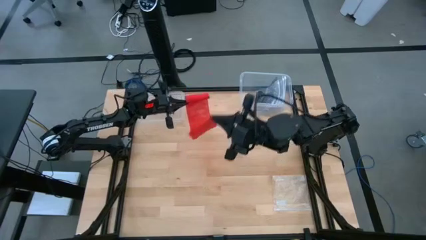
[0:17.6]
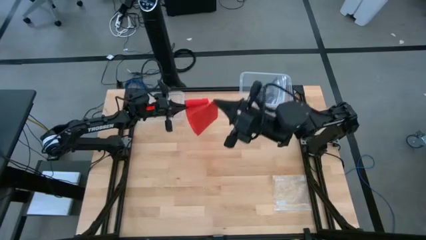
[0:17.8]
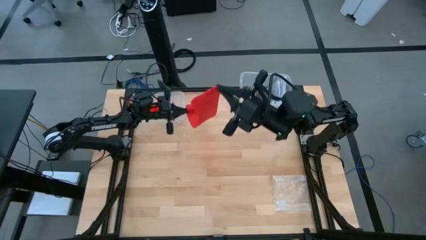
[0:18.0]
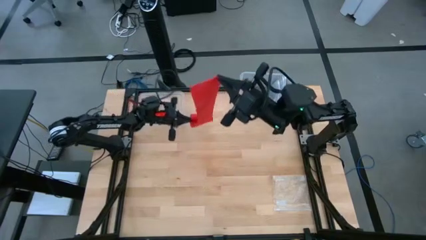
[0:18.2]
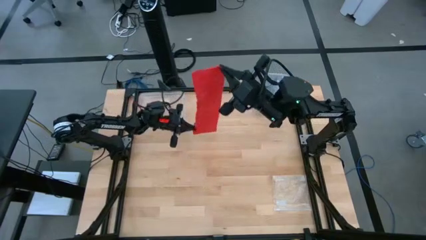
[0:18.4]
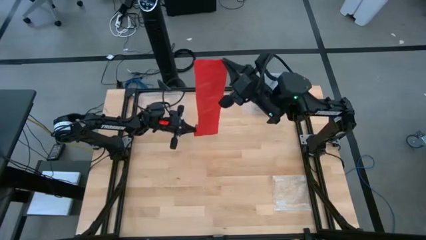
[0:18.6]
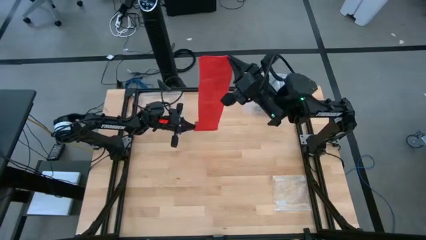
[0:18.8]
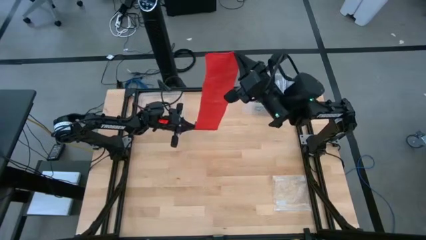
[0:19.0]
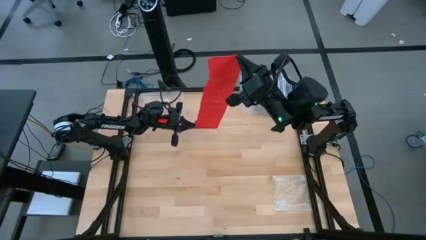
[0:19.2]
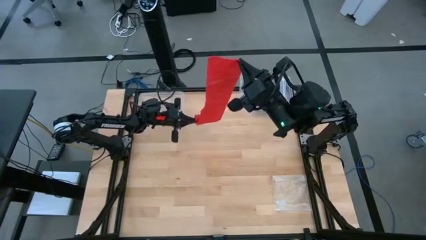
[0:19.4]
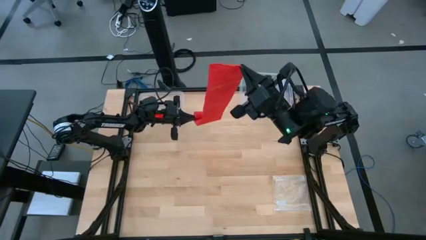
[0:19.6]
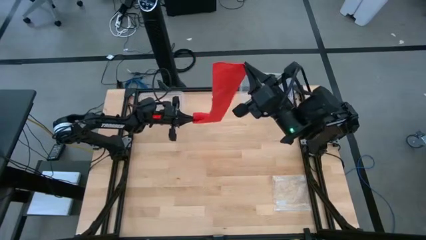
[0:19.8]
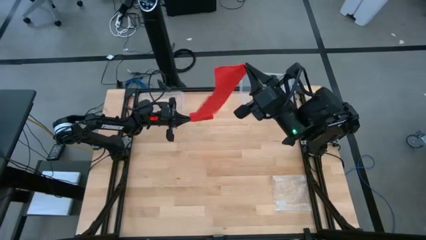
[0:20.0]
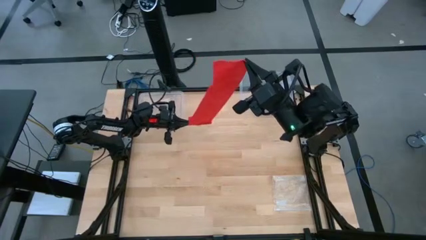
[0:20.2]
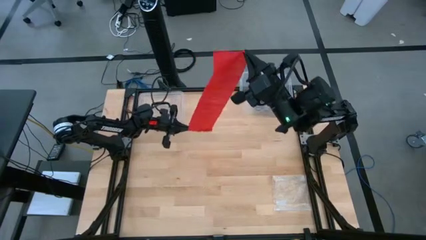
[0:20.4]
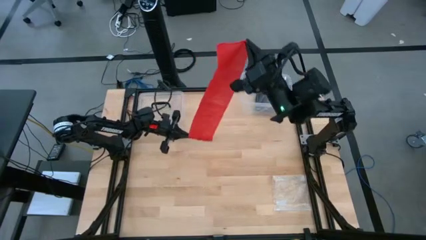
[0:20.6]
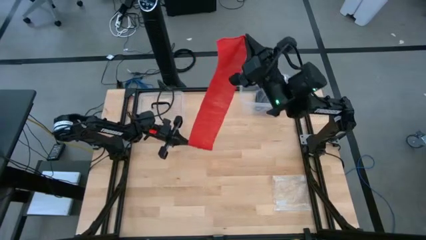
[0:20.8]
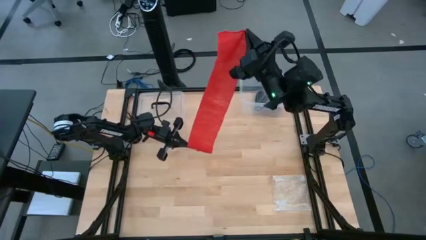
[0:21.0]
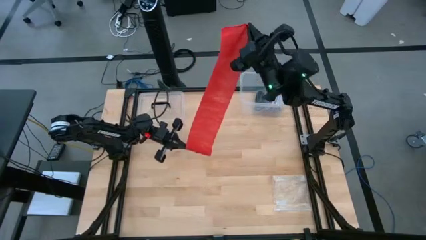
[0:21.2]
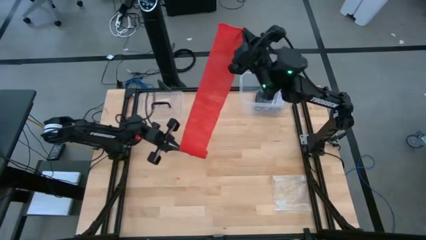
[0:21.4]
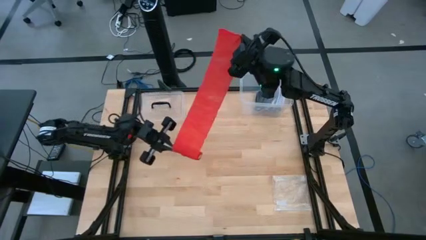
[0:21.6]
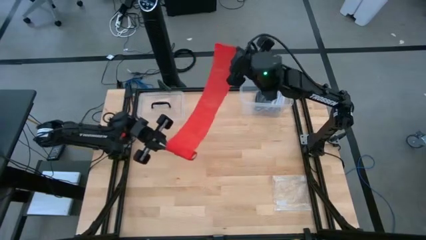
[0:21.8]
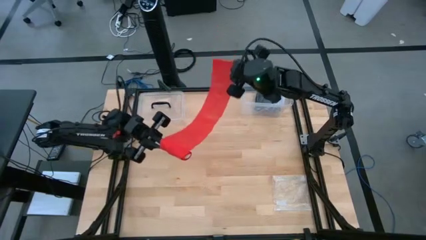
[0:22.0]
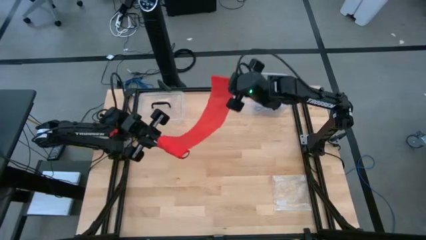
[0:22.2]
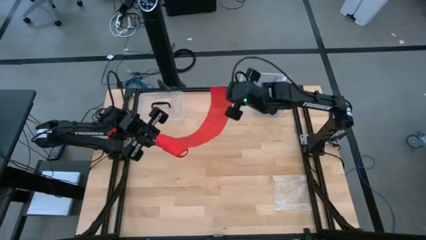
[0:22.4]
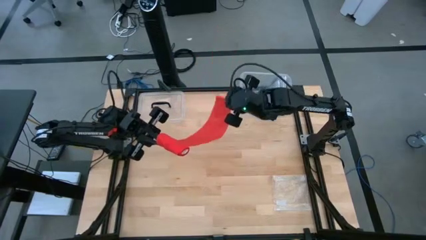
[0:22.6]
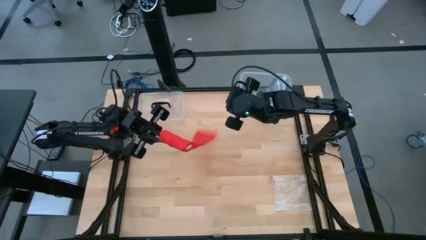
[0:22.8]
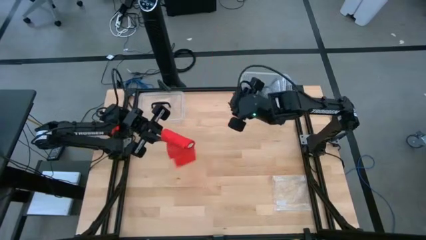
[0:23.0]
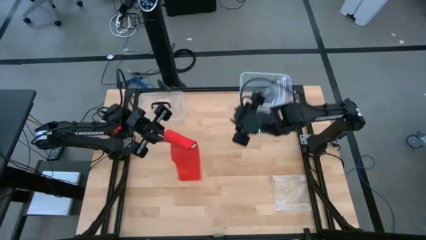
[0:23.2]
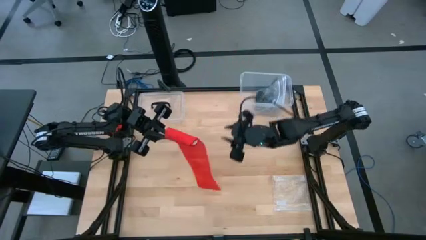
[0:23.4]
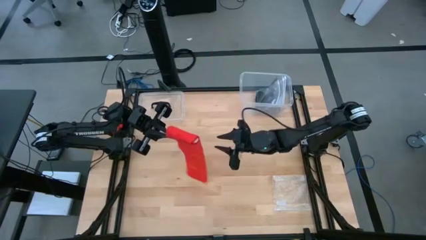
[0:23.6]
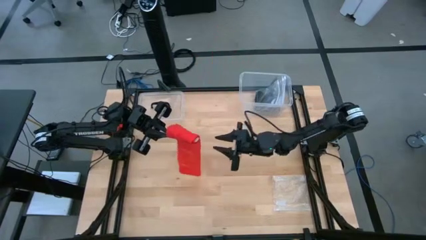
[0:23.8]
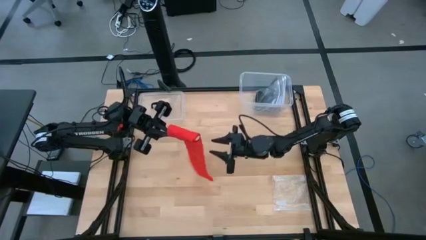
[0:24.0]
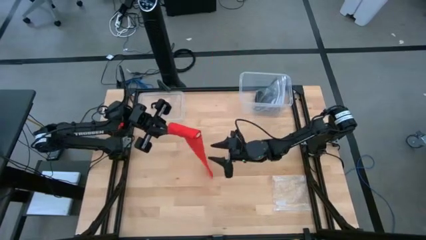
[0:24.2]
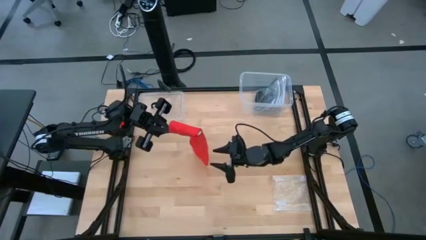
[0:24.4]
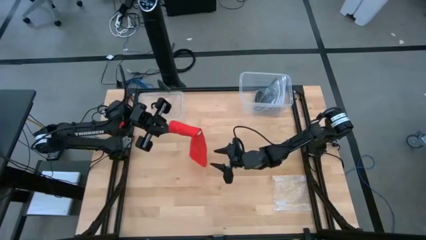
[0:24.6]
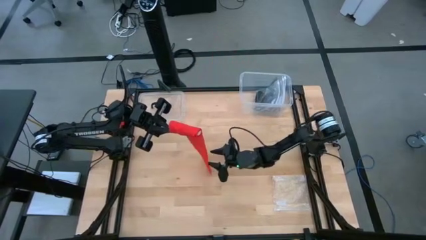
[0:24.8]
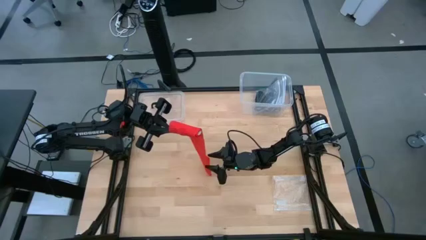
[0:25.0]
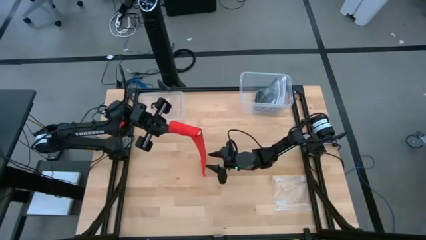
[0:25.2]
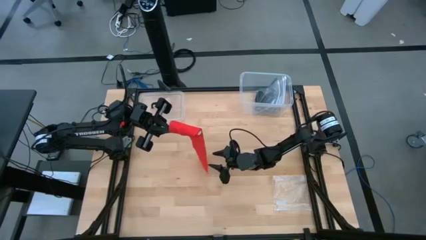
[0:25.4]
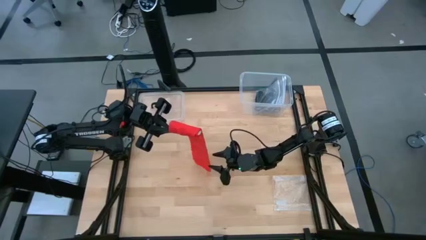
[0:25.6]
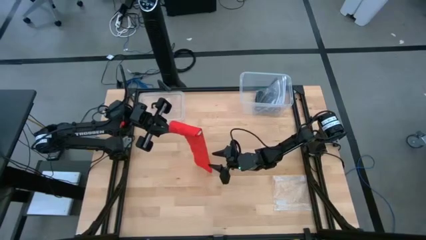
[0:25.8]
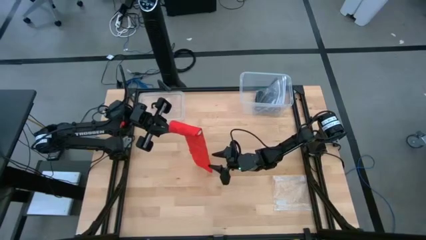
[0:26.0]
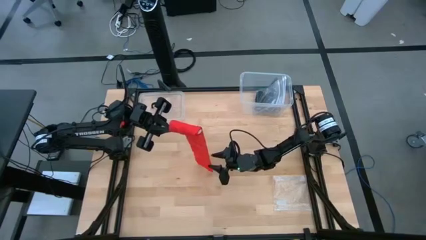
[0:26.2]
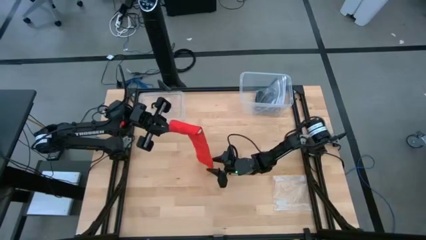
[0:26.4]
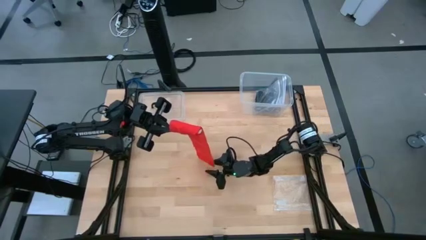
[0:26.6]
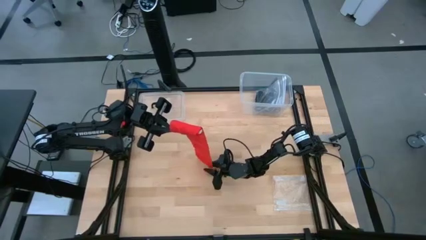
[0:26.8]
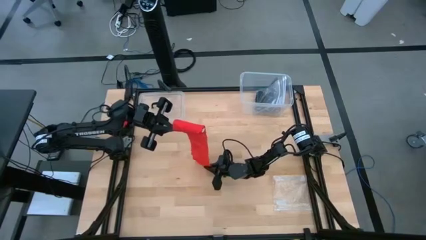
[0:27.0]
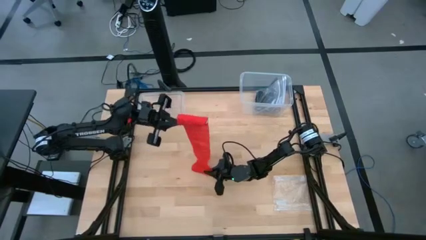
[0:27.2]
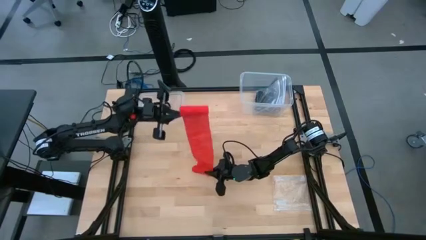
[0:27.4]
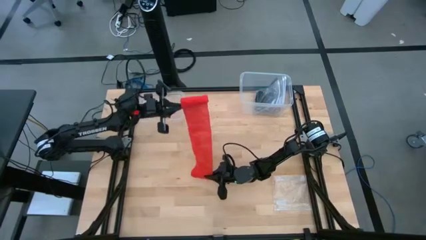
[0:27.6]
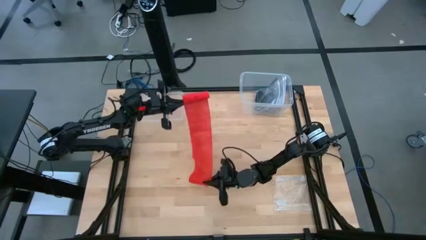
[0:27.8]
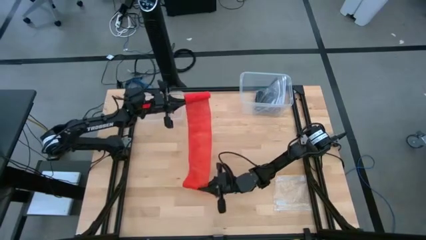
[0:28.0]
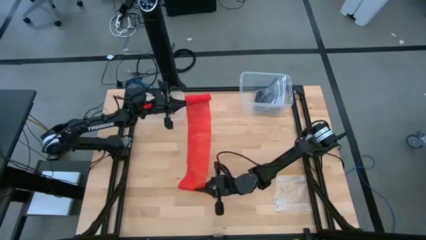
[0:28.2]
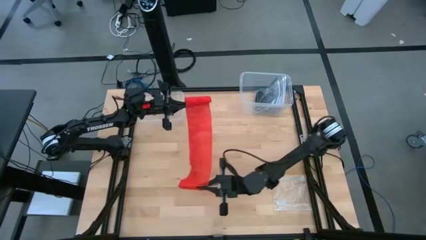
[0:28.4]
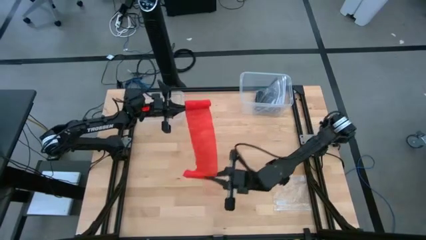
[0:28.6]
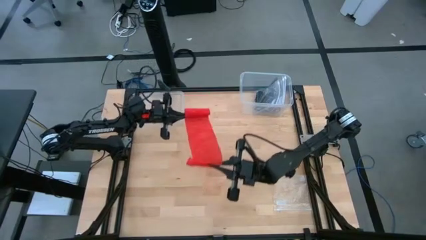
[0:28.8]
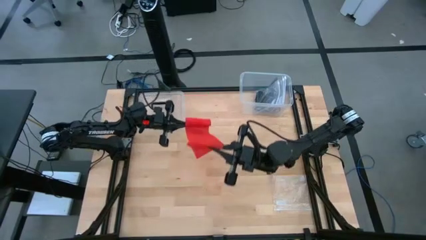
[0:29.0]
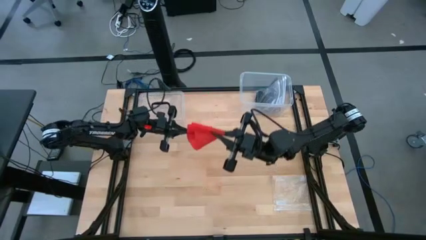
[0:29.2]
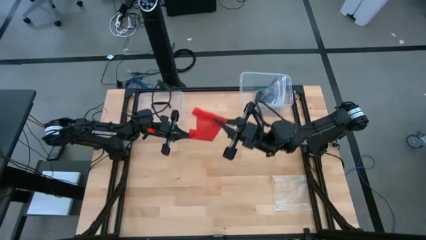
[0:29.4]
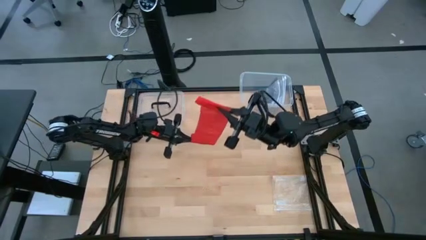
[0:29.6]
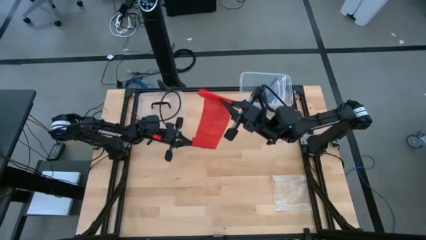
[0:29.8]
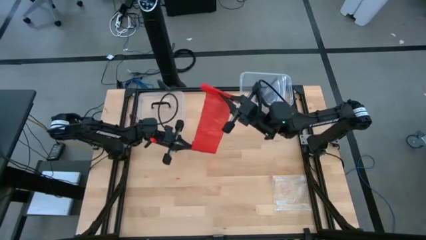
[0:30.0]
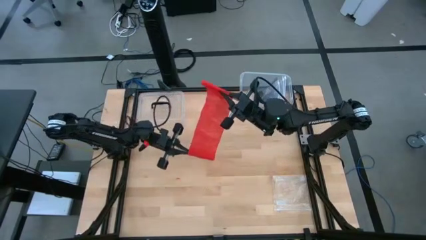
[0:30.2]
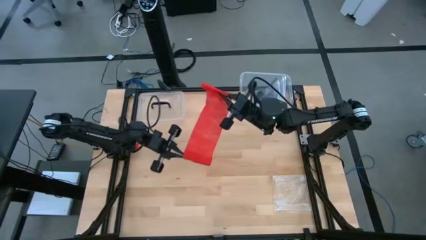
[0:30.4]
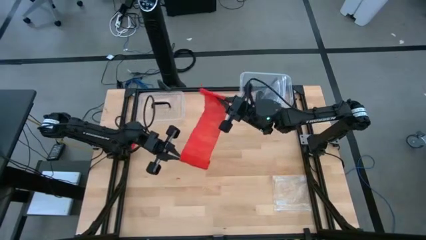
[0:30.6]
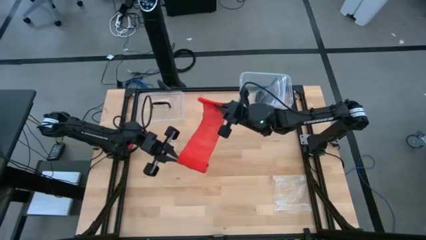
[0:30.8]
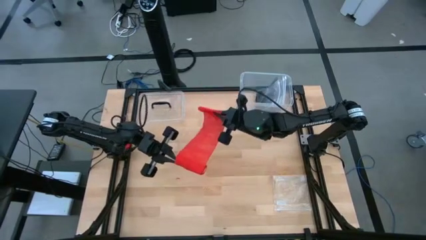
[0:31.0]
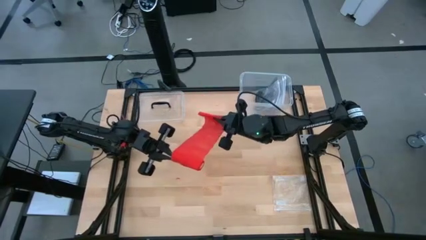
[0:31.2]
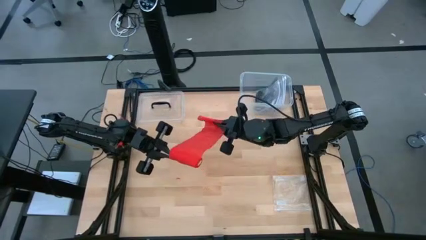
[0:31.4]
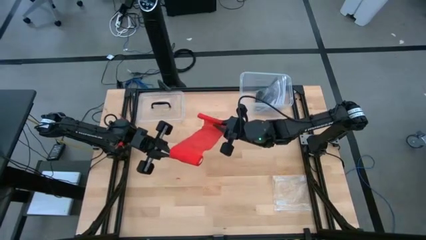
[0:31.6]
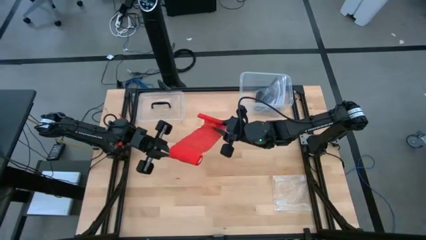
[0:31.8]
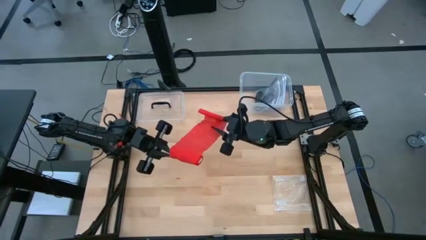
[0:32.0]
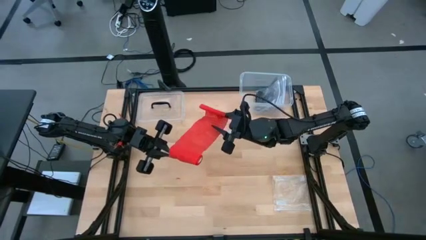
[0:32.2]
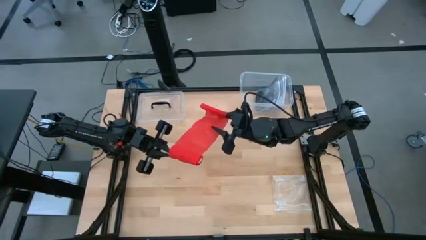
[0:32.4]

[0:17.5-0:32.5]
Task: Roll bandage
Roll the red bandage
